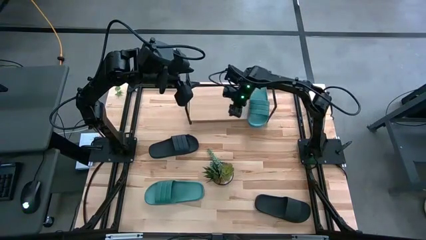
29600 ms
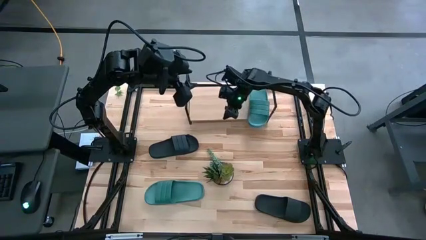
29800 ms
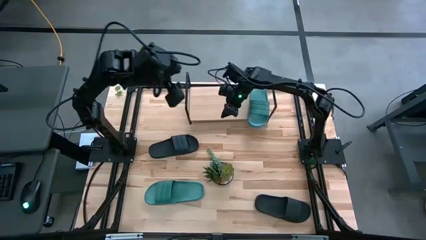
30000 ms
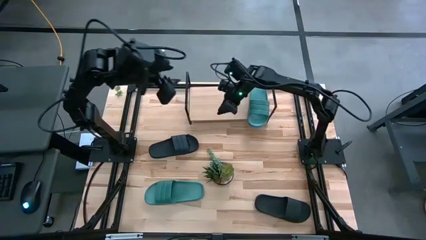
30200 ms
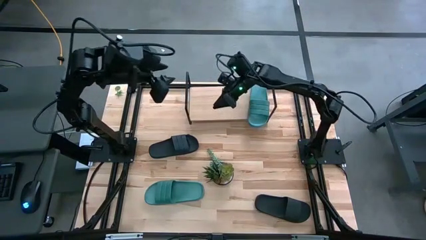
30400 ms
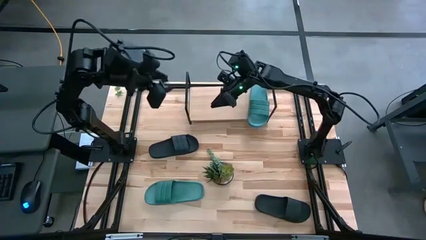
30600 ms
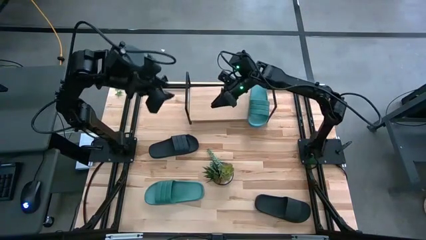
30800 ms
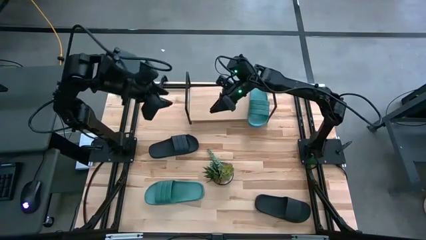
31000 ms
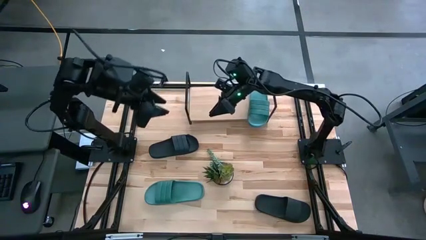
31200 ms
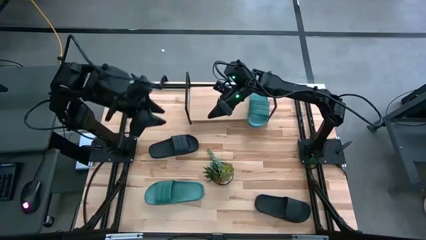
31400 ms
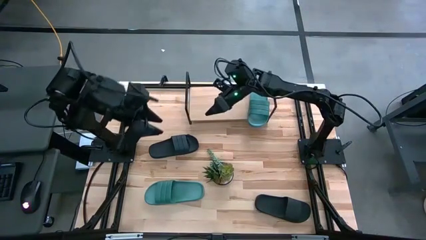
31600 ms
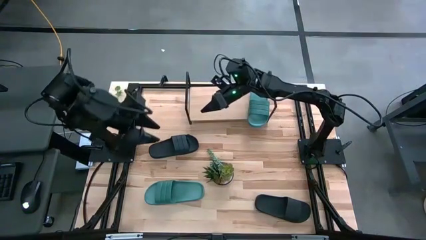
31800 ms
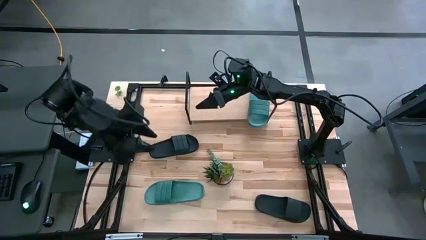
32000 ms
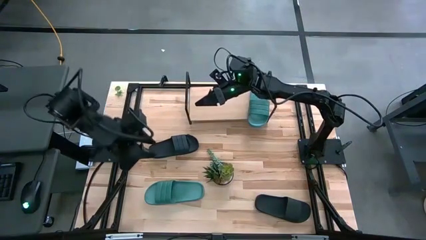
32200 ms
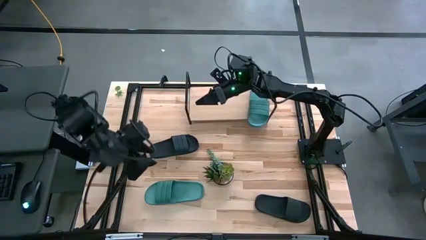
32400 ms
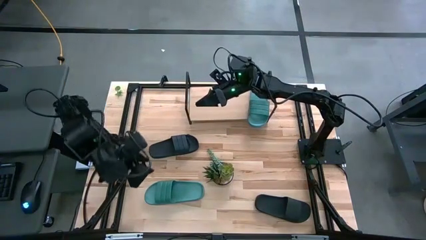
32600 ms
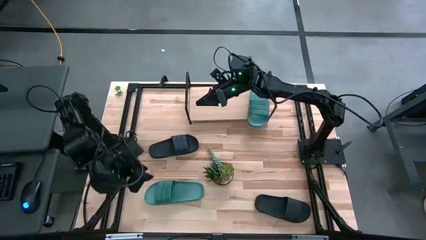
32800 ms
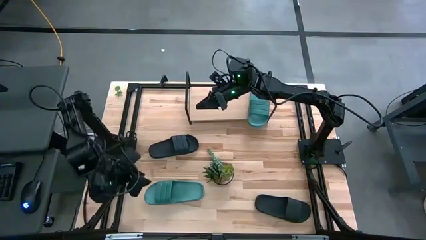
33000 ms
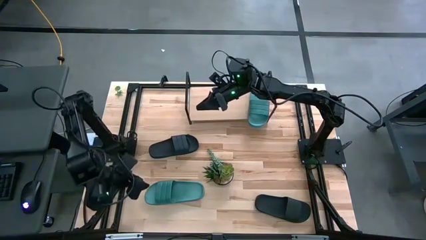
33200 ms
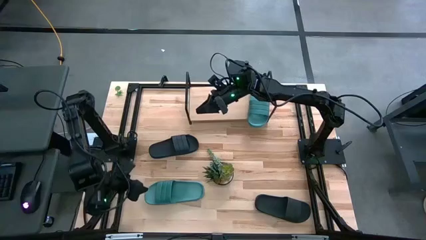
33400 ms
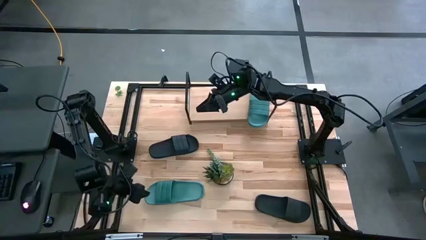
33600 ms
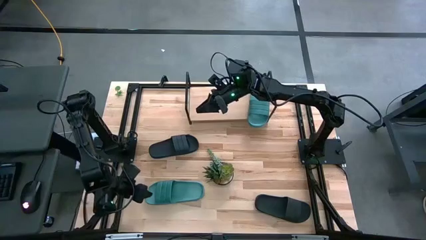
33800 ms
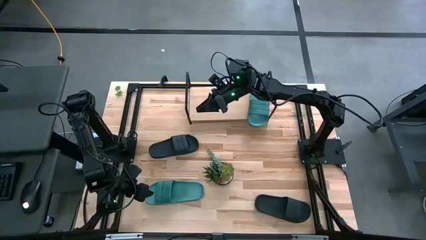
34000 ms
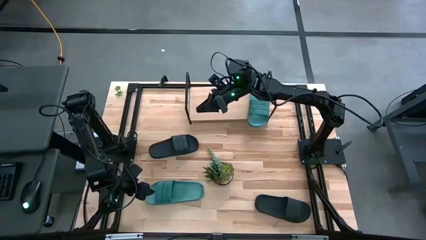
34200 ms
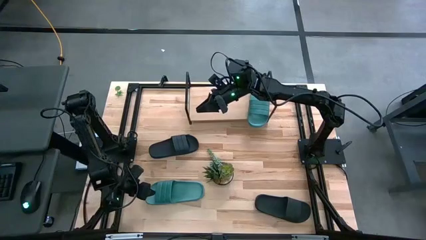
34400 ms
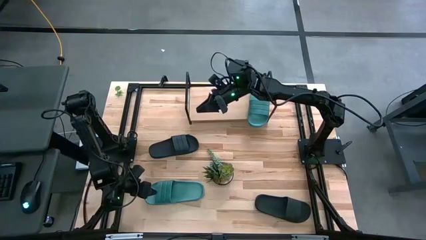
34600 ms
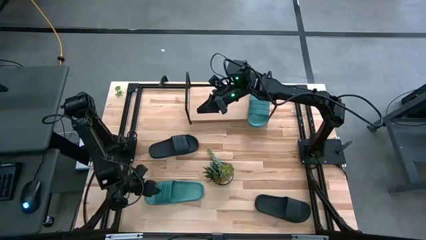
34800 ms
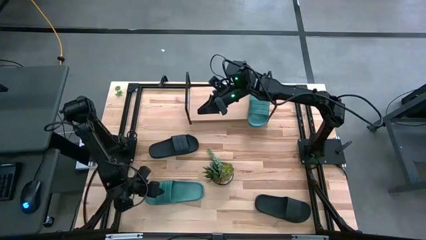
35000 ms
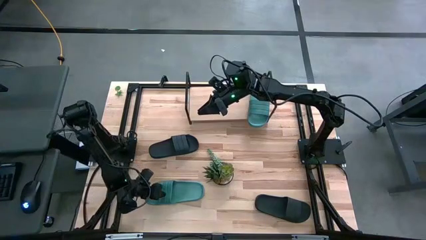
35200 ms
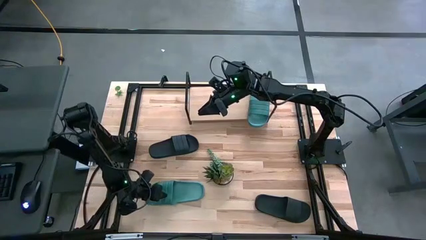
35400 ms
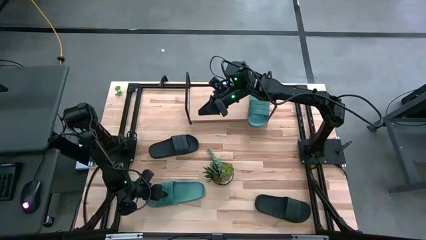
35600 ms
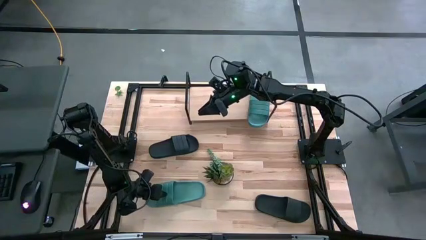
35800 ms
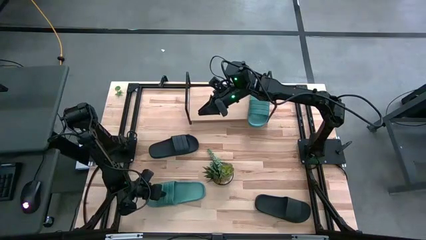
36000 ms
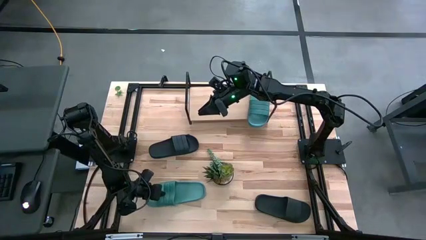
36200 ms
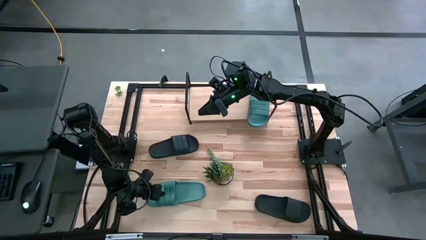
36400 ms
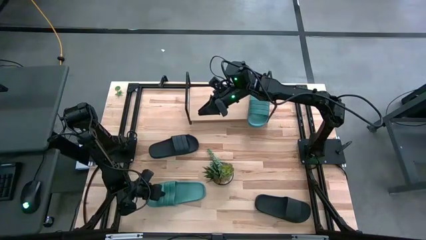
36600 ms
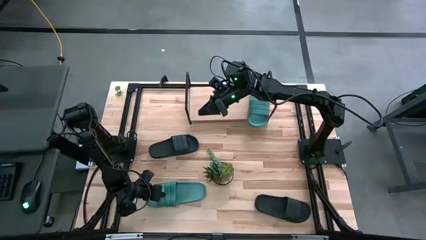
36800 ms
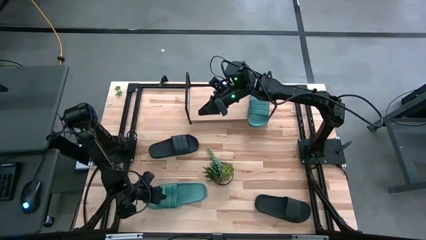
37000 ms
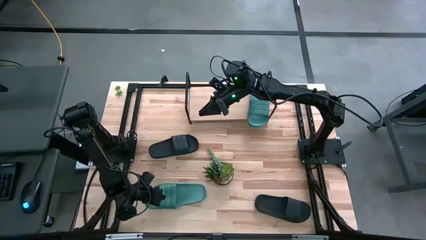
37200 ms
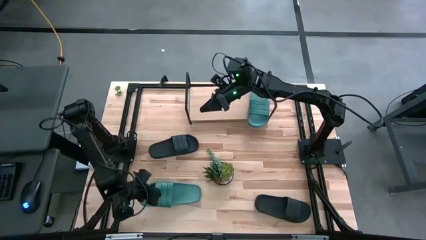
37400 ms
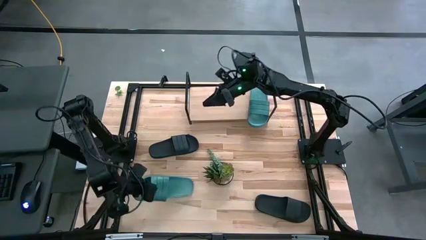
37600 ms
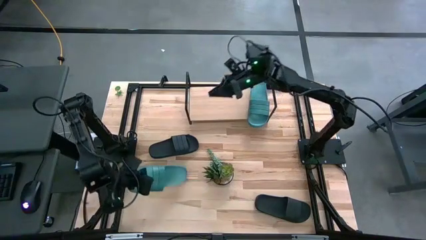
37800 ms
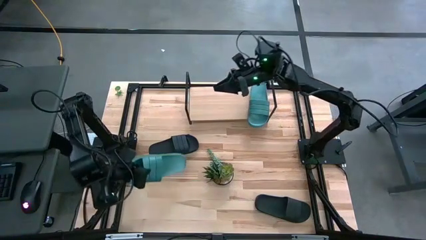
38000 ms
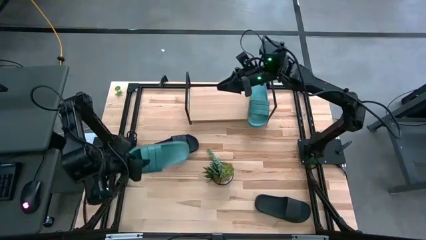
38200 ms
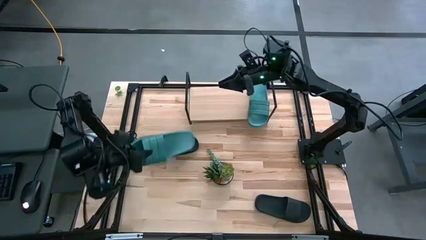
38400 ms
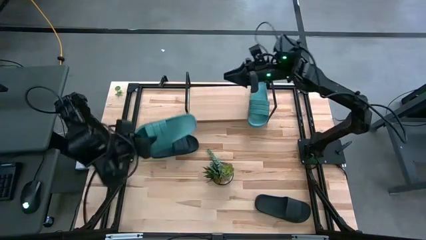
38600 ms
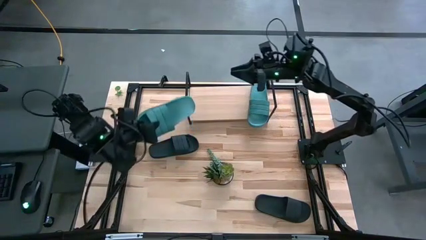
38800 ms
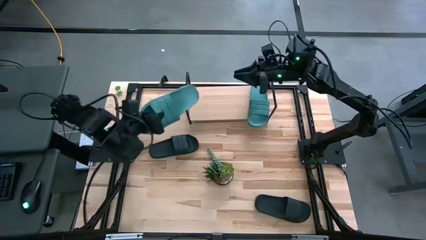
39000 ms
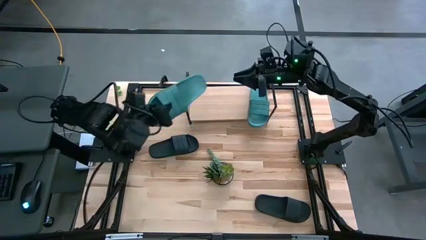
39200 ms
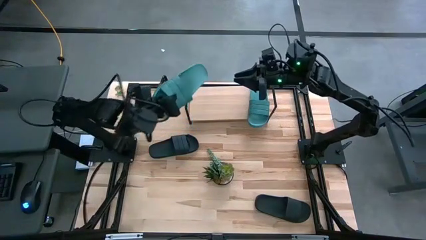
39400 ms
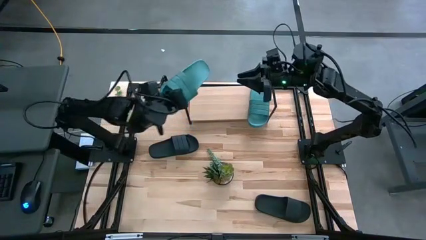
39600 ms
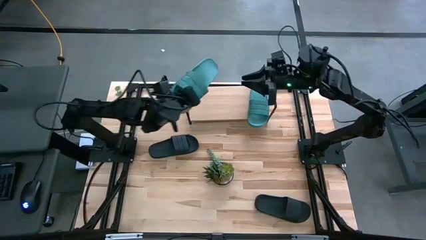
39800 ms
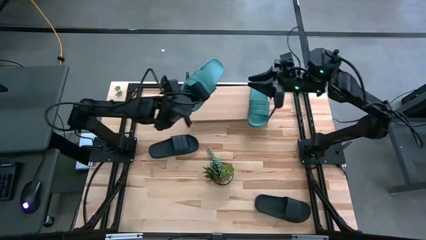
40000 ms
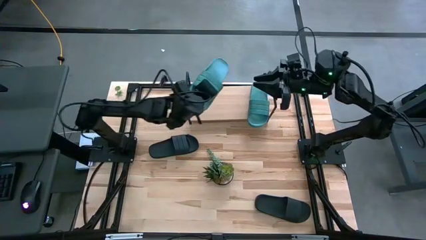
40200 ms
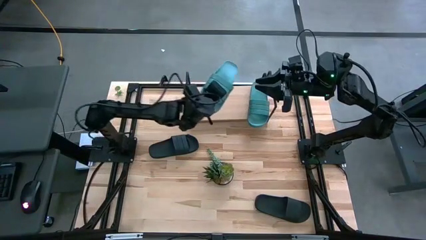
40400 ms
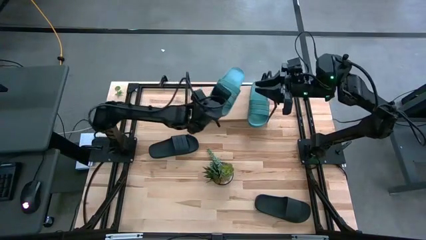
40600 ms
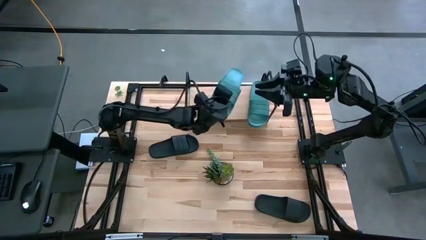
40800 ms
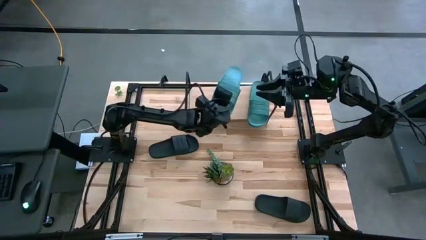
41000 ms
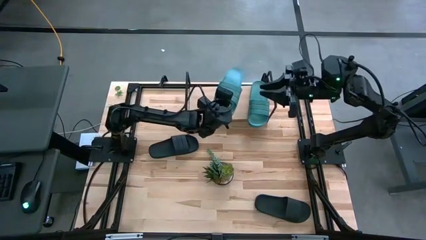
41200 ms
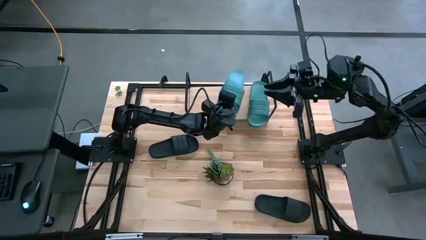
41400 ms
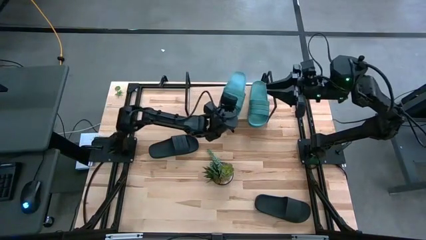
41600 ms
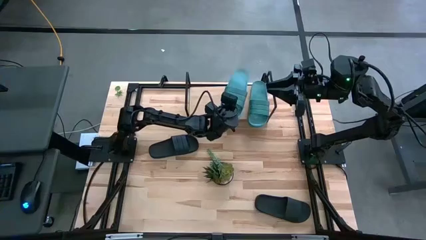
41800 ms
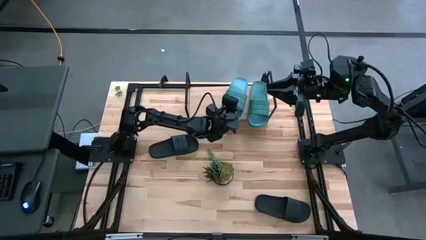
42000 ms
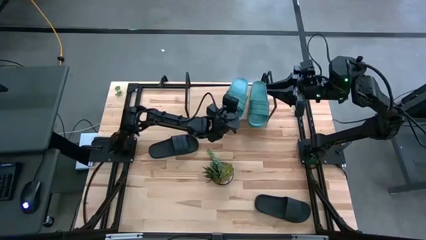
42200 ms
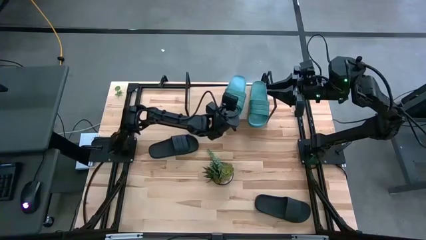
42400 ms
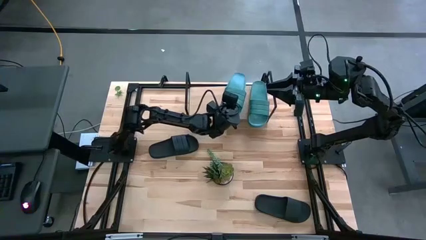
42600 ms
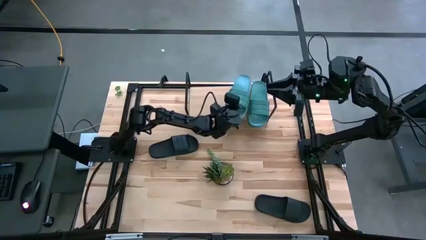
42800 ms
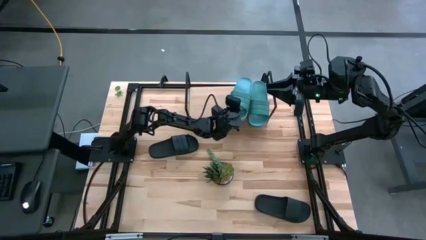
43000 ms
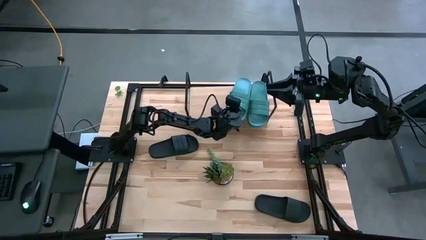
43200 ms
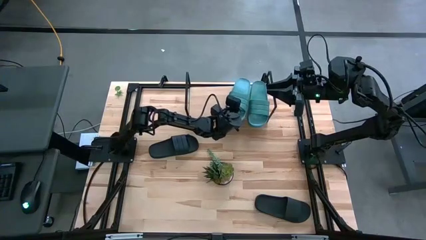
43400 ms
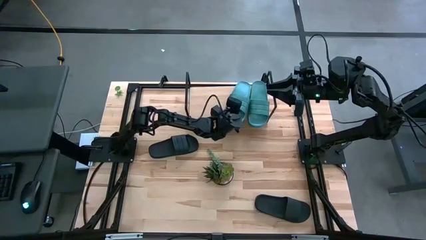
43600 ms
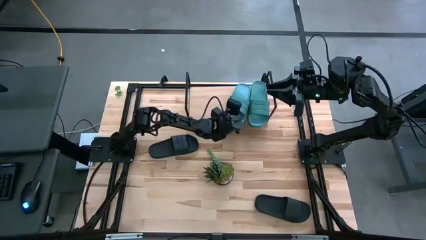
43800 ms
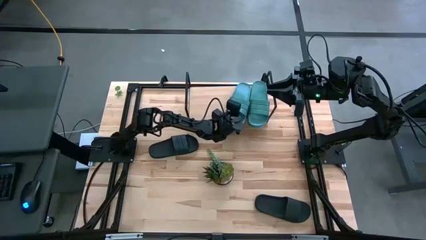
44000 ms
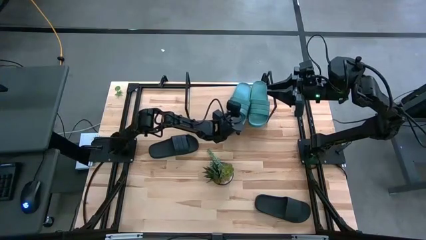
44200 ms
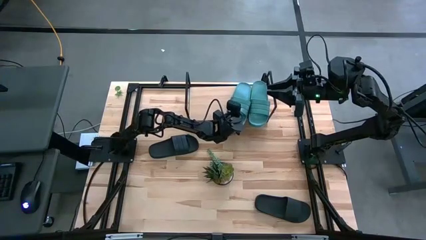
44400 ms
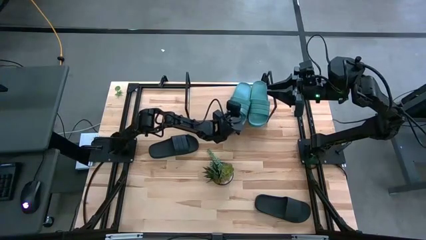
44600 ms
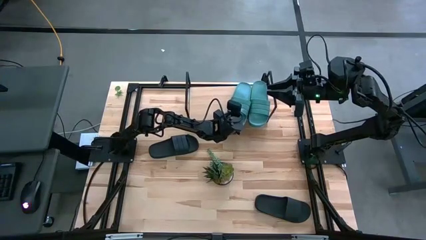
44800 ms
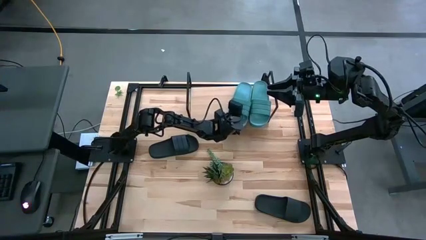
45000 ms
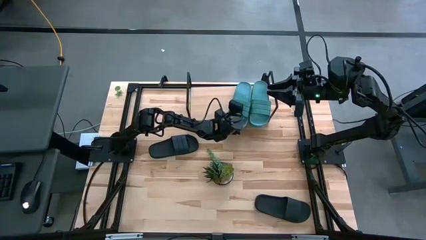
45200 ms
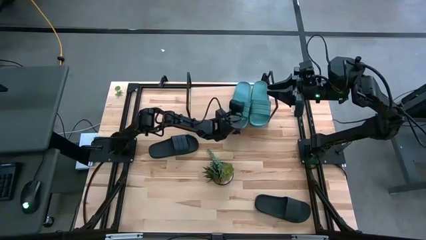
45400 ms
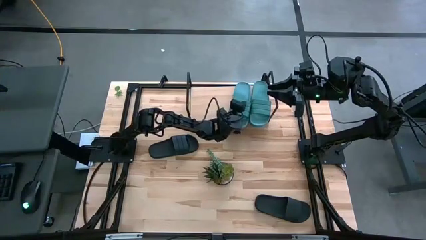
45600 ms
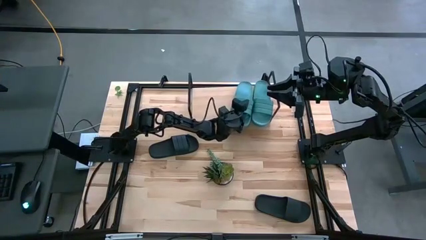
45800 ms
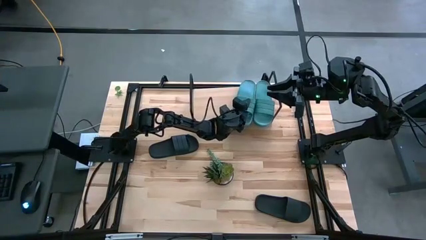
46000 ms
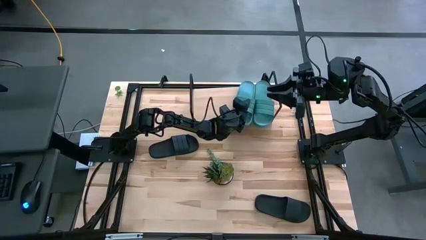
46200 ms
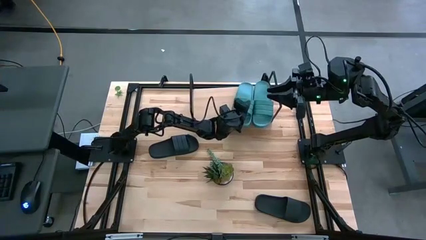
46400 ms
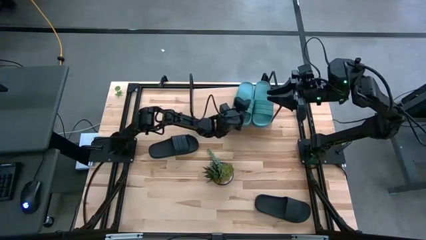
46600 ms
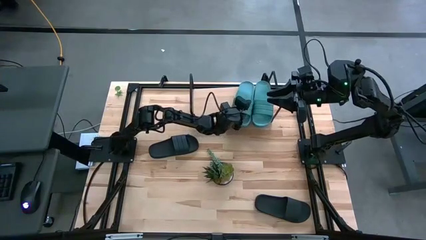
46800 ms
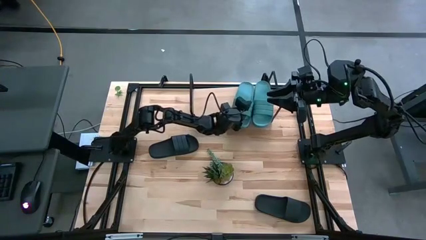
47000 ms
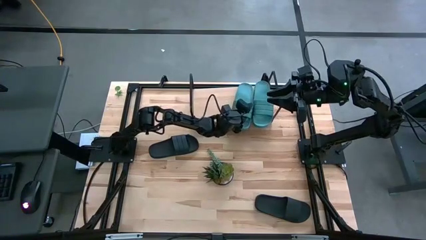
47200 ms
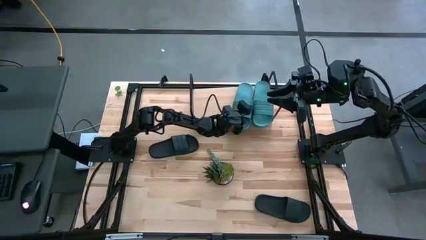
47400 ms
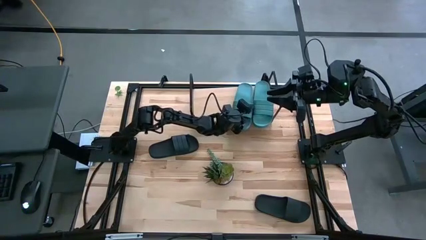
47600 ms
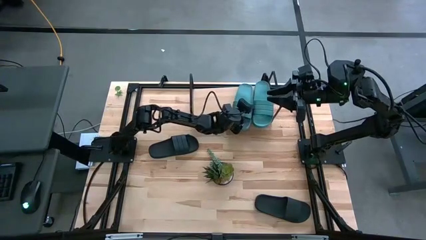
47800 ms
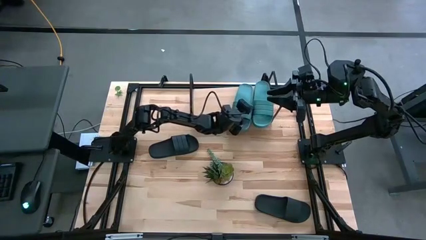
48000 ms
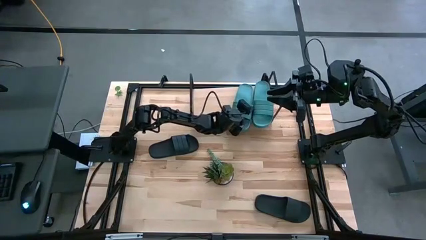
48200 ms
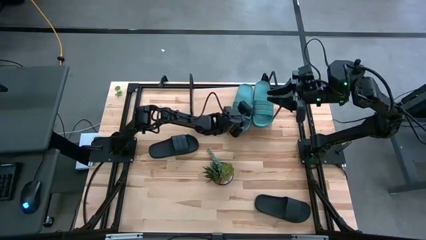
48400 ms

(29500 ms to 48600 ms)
Task: Pick and place slides into the shelf
Put the blue slipper on the shelf
